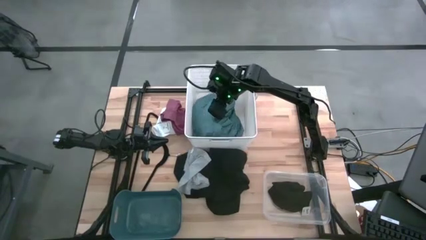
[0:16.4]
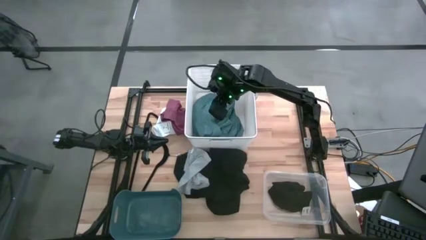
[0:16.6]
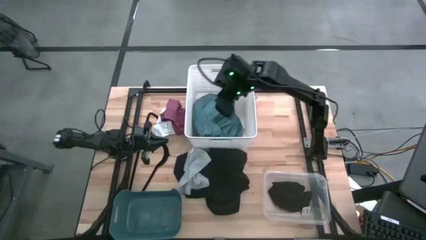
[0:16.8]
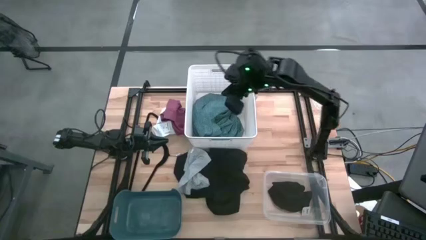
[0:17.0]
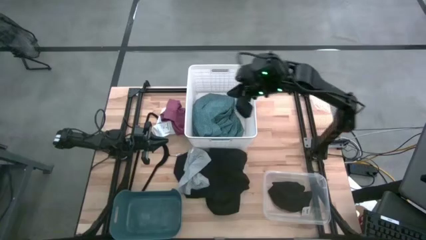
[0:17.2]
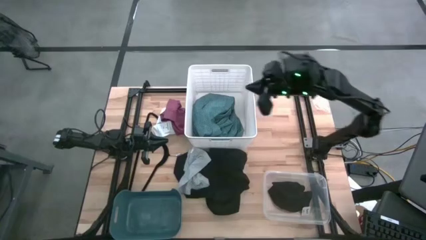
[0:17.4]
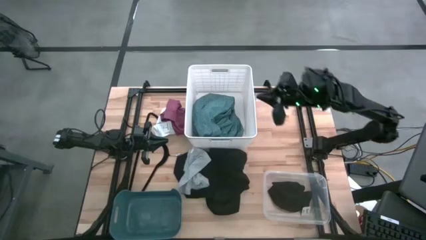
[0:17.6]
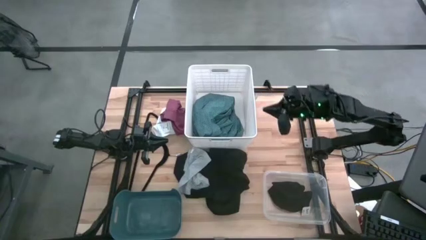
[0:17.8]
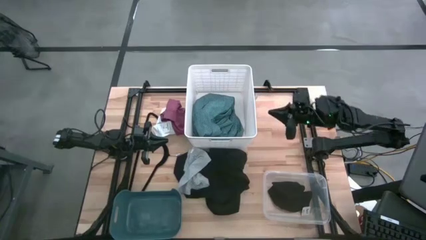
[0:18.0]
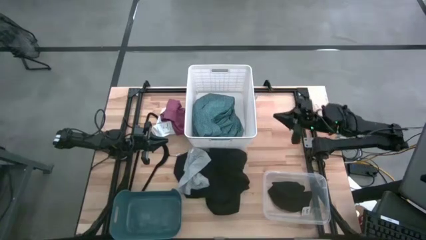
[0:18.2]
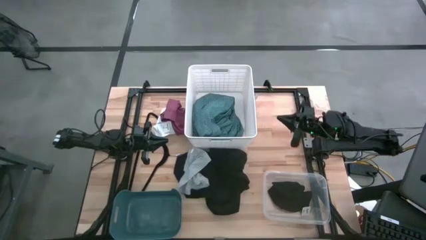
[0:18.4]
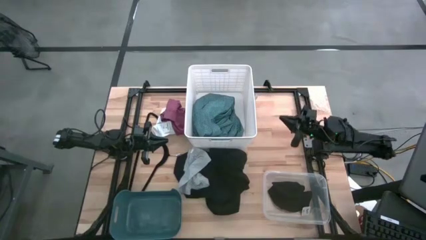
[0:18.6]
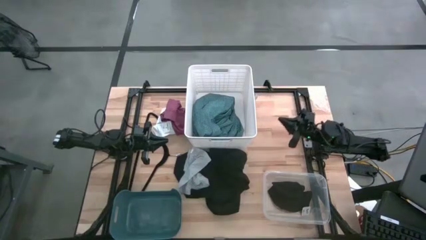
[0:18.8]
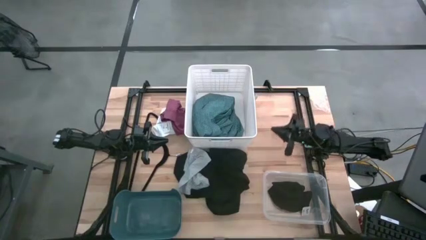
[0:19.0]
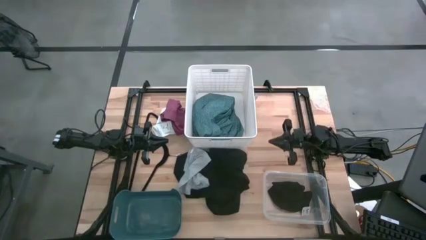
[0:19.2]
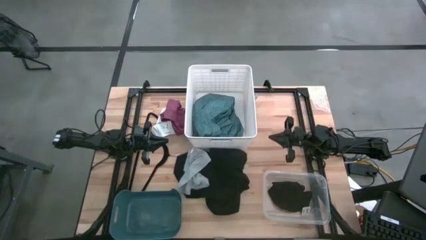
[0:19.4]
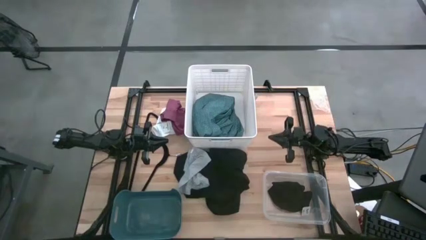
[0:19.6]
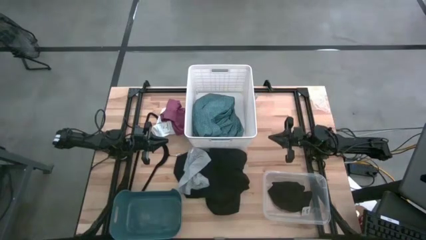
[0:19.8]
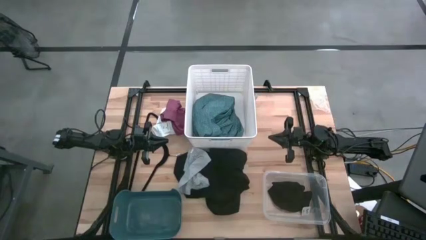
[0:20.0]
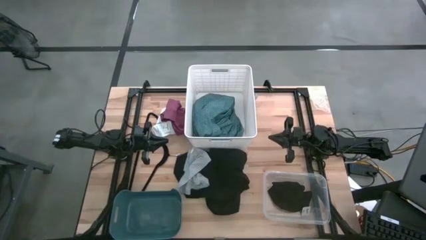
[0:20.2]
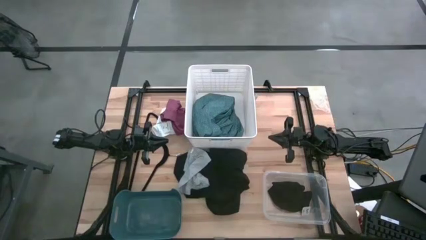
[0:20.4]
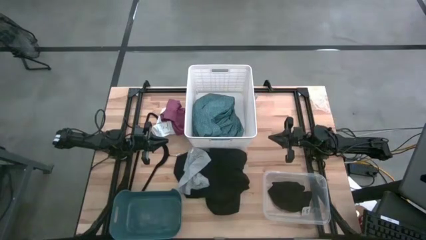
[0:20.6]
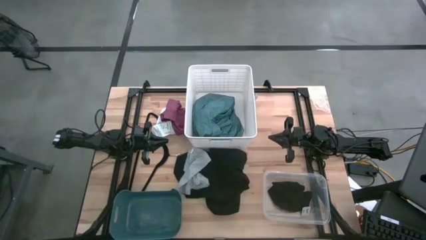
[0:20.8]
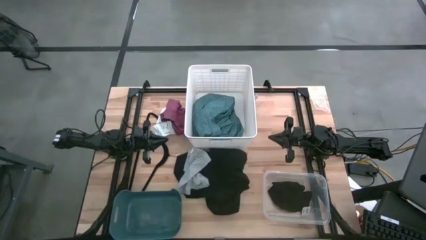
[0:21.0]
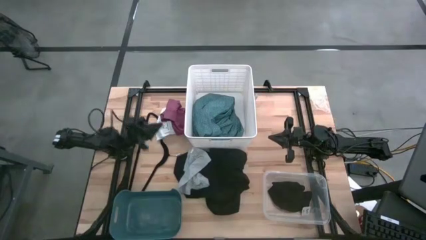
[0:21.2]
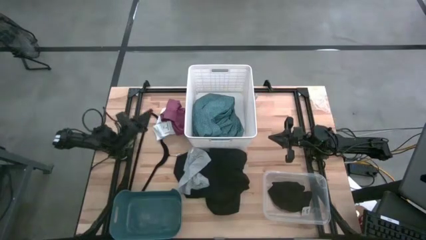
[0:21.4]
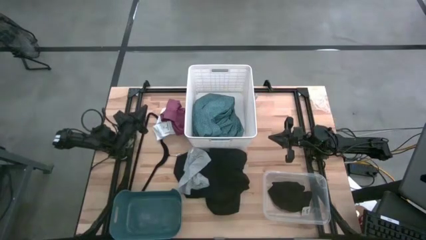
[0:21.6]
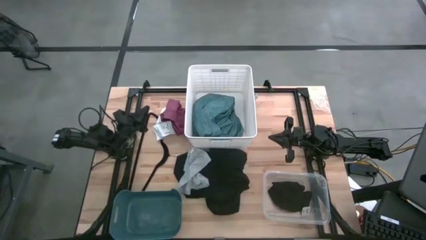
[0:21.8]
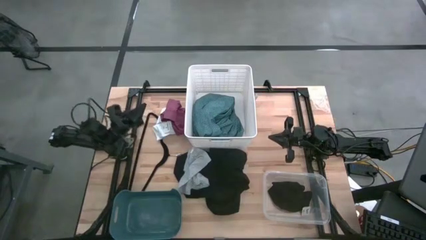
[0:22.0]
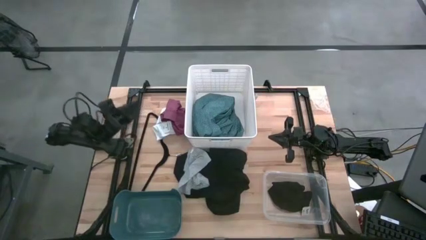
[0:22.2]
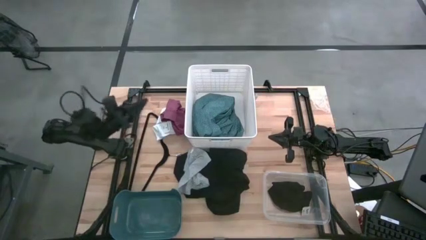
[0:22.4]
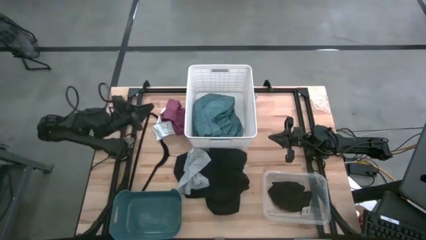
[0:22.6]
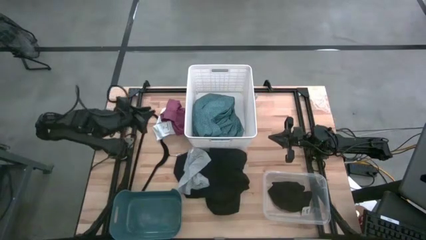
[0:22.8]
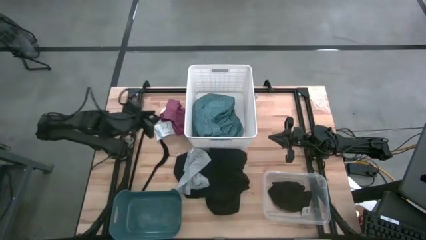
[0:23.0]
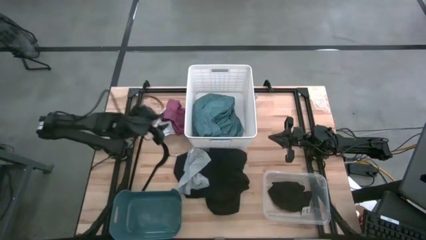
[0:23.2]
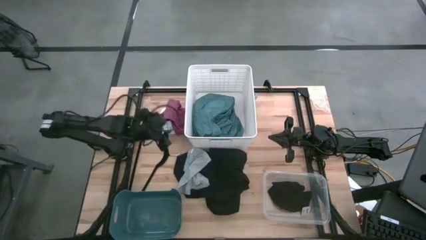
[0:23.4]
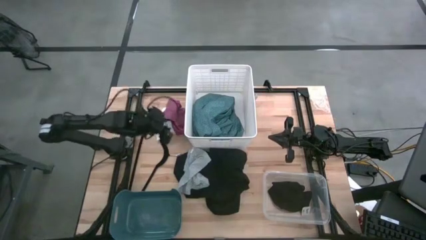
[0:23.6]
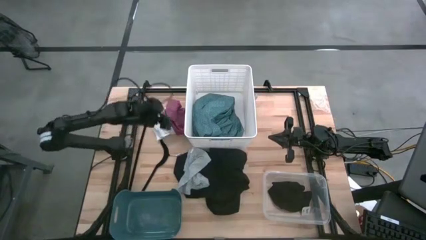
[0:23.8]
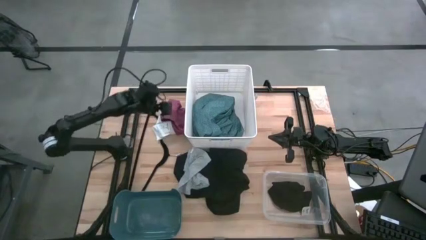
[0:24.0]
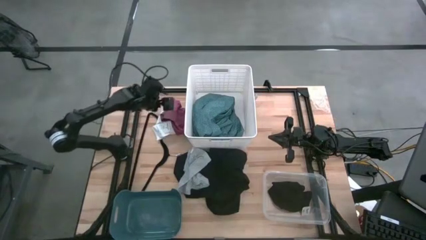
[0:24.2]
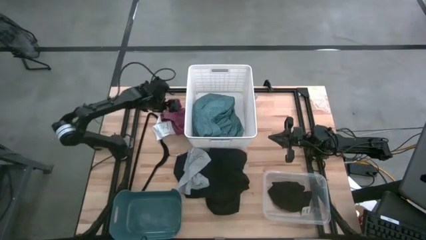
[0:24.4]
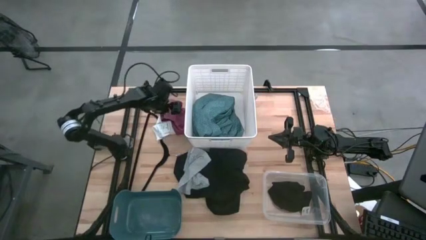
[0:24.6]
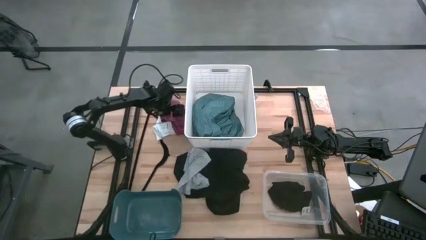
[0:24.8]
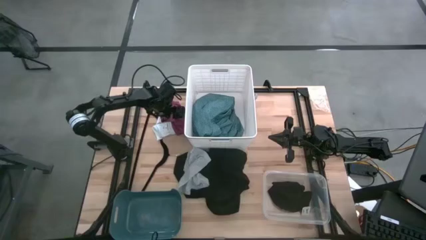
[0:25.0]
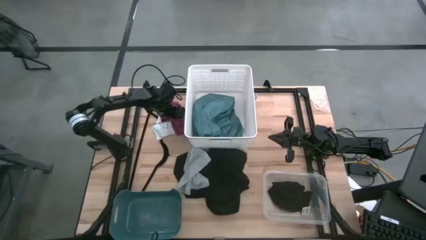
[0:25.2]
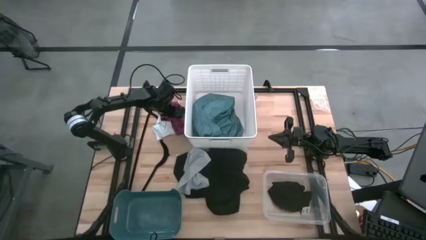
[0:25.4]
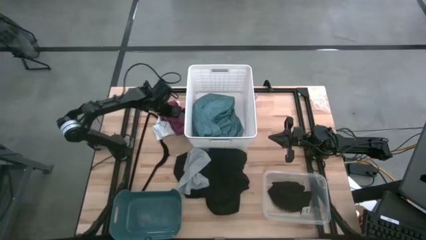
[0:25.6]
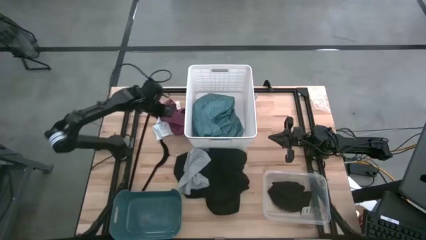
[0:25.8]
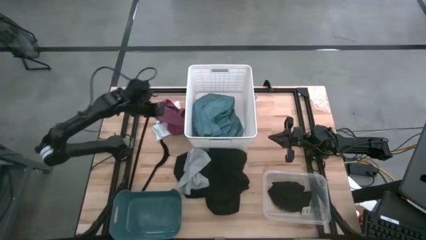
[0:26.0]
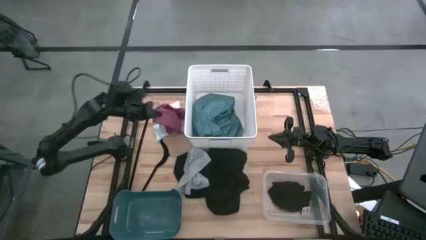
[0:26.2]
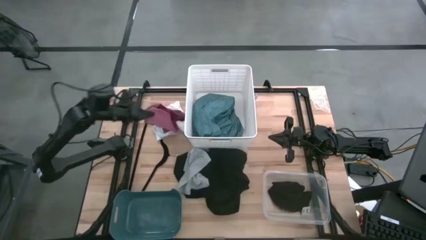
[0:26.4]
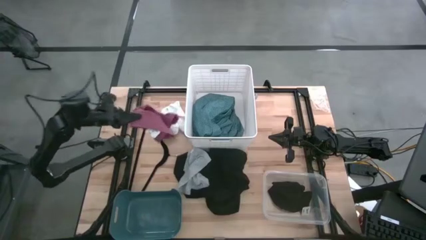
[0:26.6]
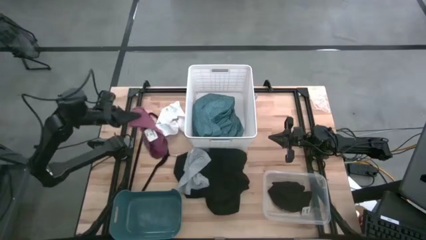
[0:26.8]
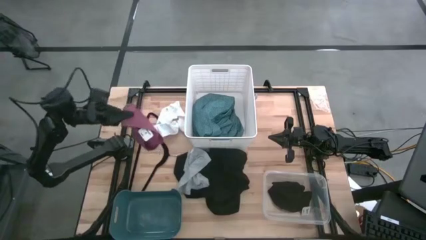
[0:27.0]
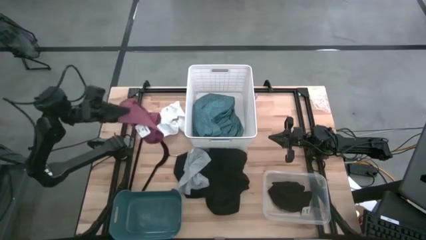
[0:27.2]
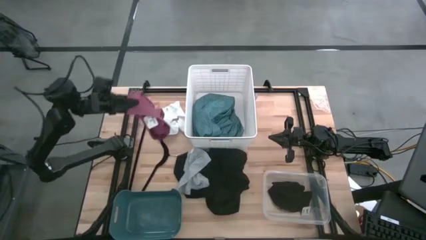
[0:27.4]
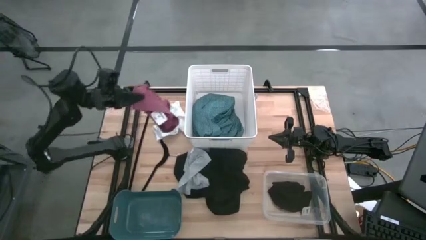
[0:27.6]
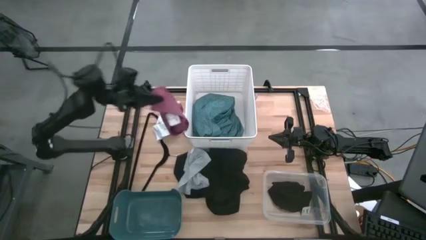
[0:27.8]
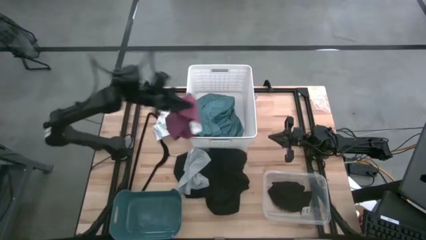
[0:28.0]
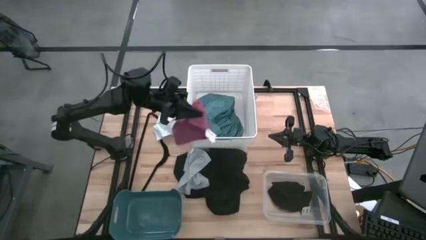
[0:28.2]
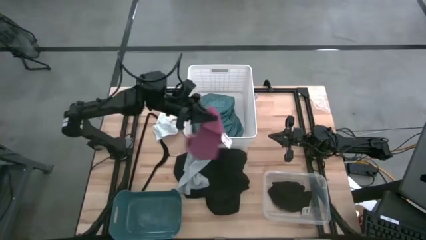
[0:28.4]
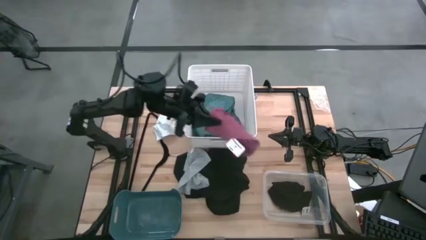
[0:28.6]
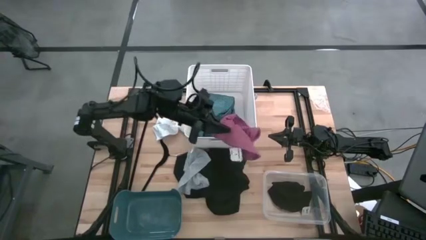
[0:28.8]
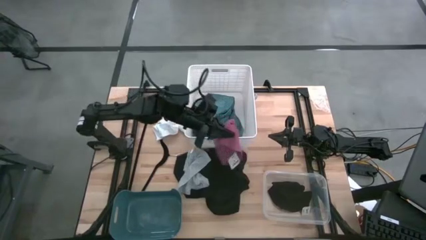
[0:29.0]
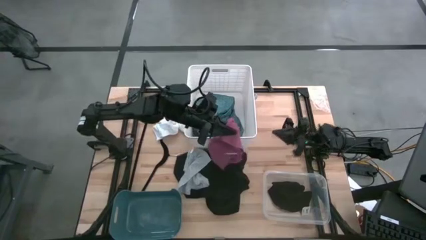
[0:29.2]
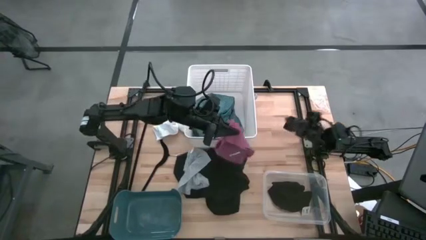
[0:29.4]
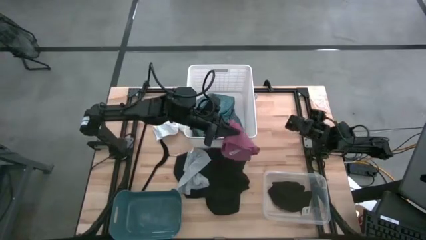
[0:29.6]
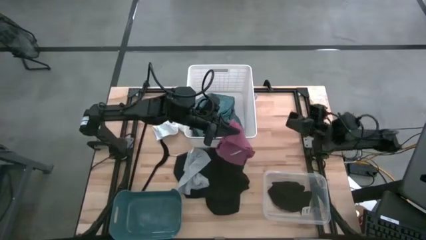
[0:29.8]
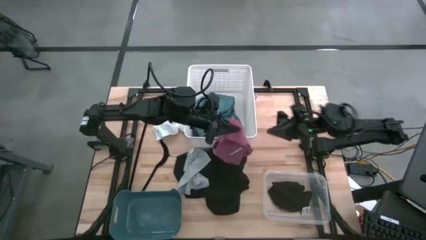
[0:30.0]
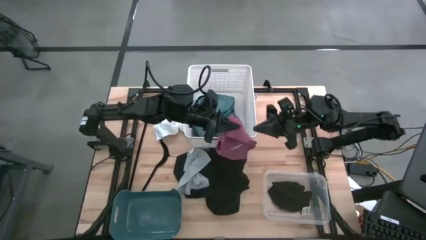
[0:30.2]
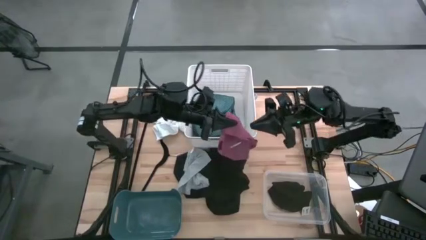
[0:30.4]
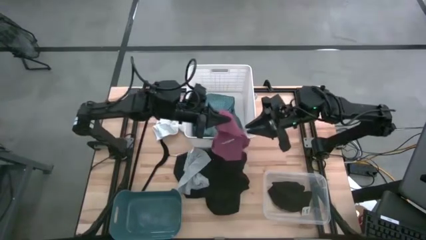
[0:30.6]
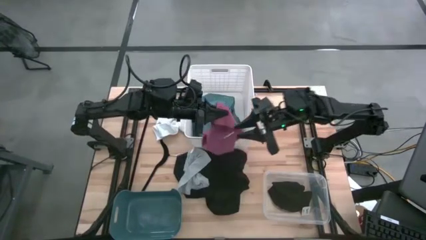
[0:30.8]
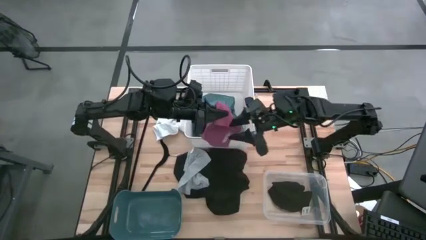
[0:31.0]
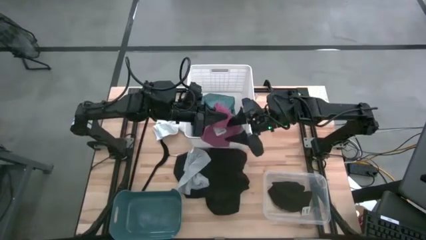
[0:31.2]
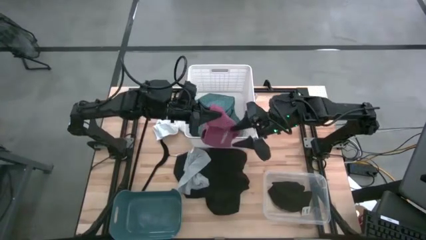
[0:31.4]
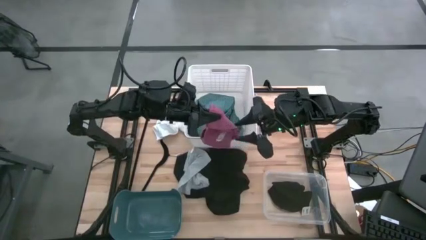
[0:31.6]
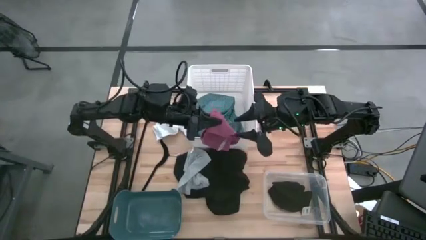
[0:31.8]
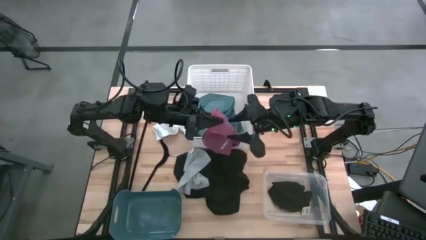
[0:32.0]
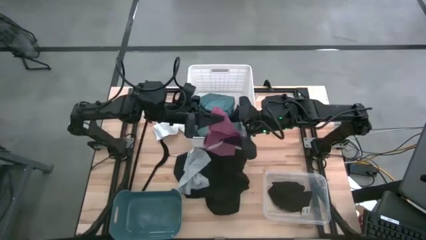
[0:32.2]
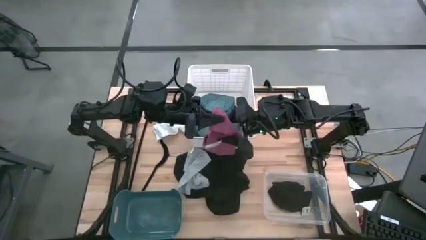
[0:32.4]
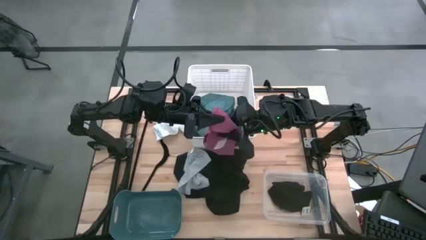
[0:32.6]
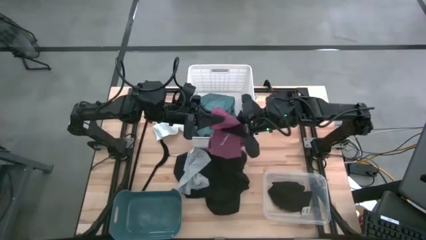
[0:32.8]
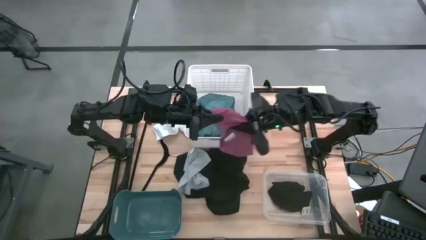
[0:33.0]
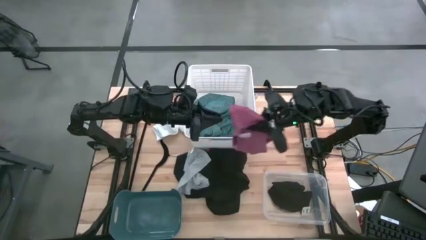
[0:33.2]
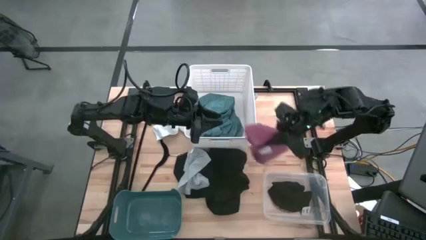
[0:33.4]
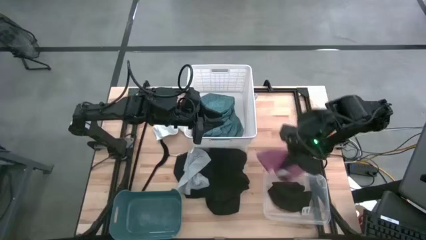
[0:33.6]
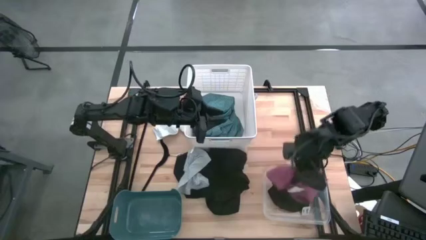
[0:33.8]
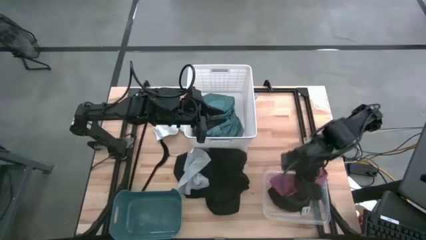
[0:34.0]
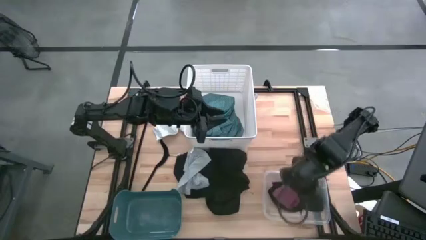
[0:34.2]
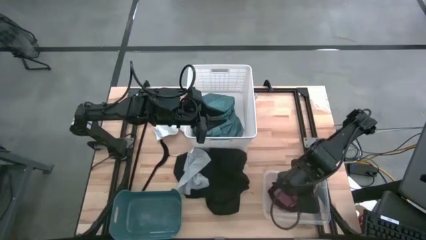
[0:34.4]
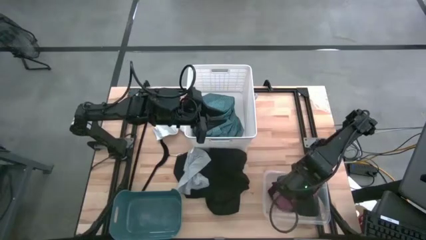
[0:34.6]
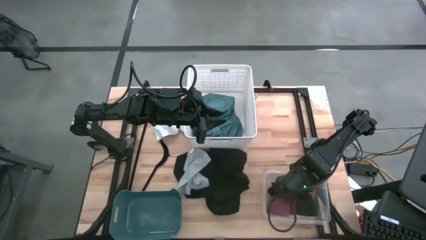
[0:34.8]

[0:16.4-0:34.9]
Task: Pick & Place Cloths
Put the red underwear into the transparent bin
